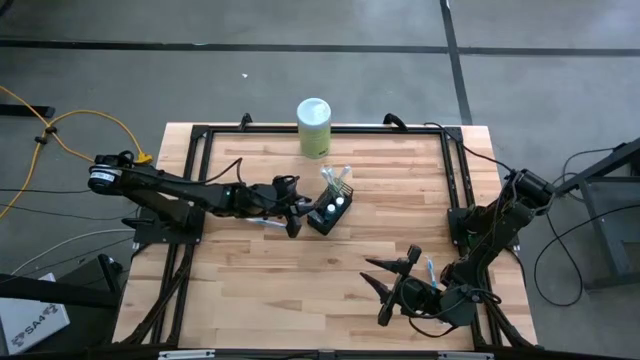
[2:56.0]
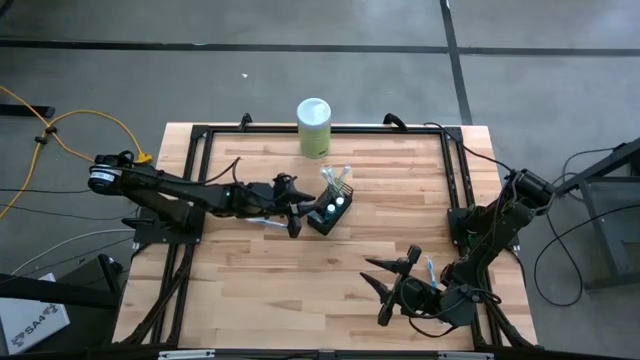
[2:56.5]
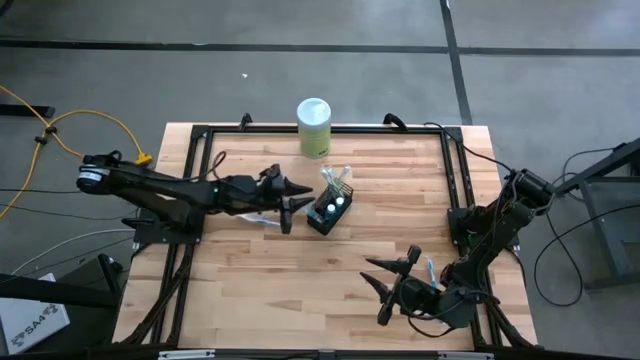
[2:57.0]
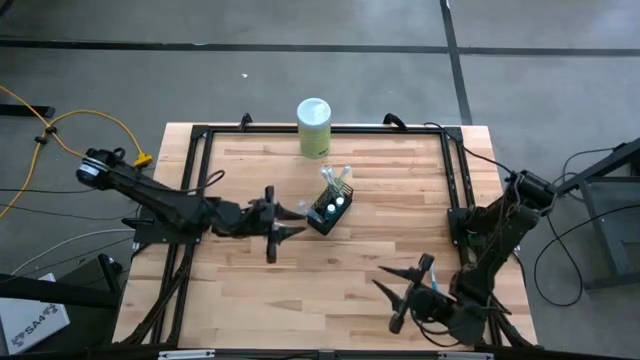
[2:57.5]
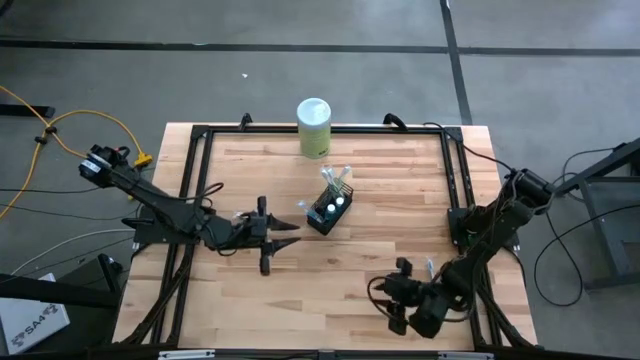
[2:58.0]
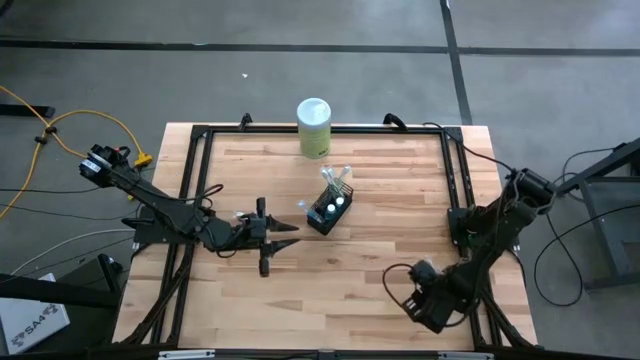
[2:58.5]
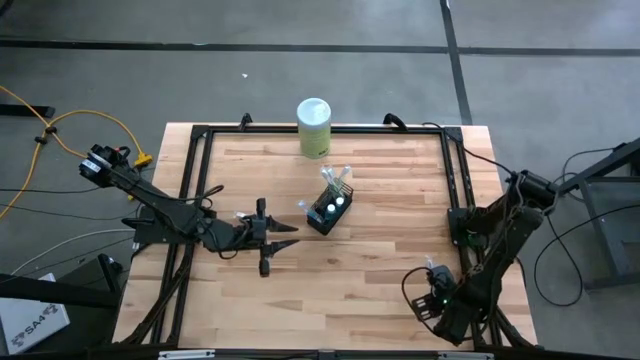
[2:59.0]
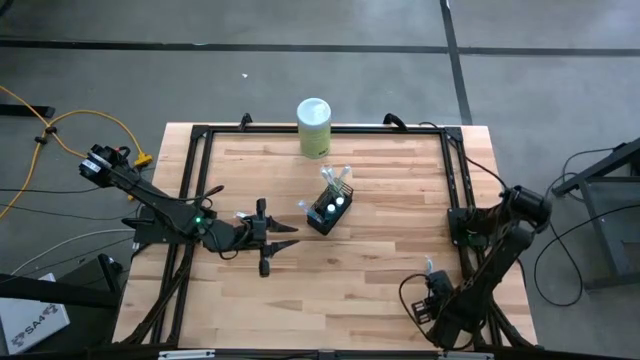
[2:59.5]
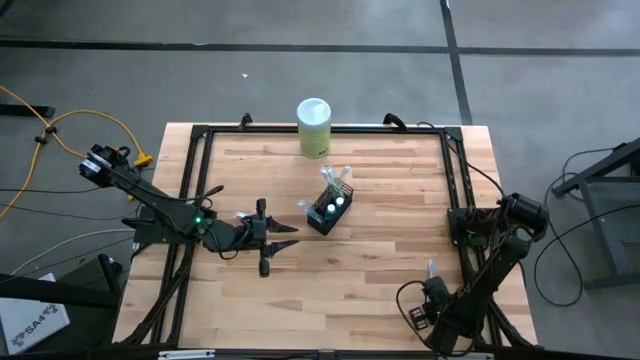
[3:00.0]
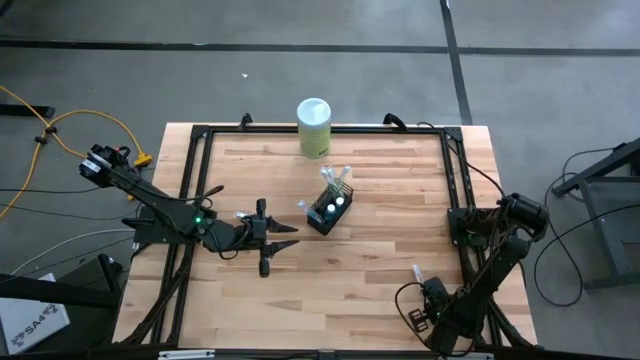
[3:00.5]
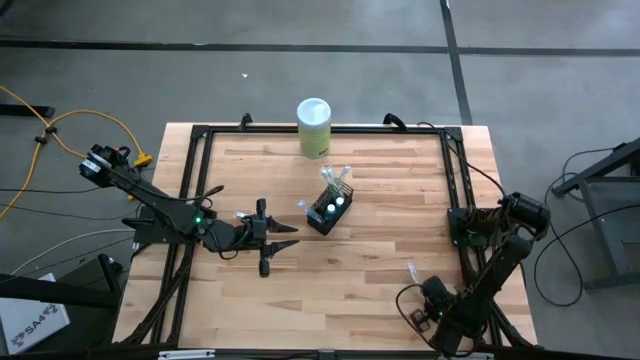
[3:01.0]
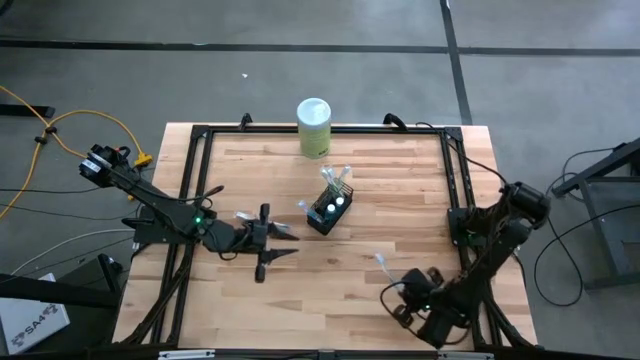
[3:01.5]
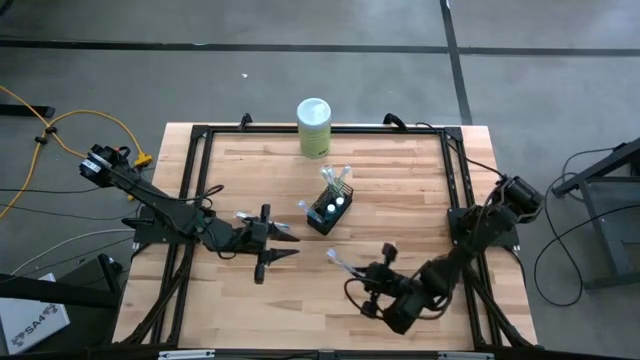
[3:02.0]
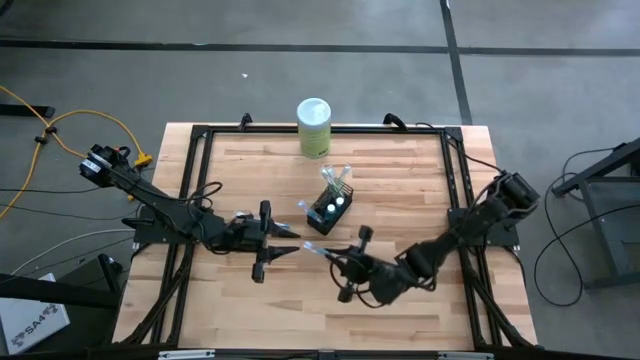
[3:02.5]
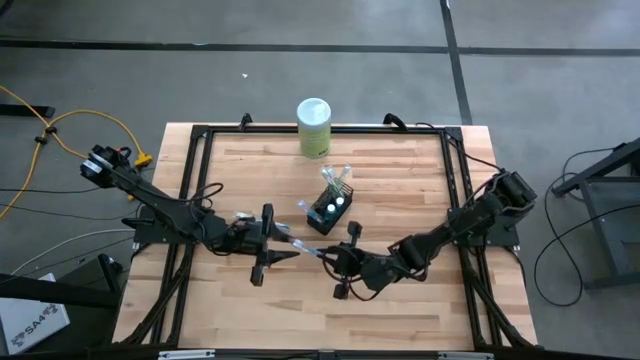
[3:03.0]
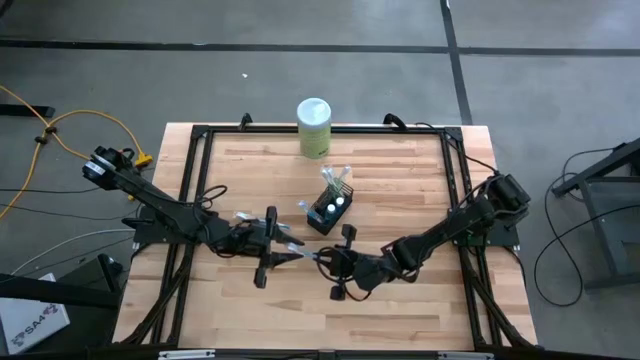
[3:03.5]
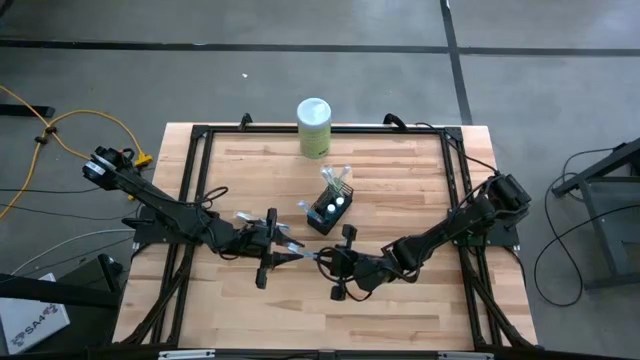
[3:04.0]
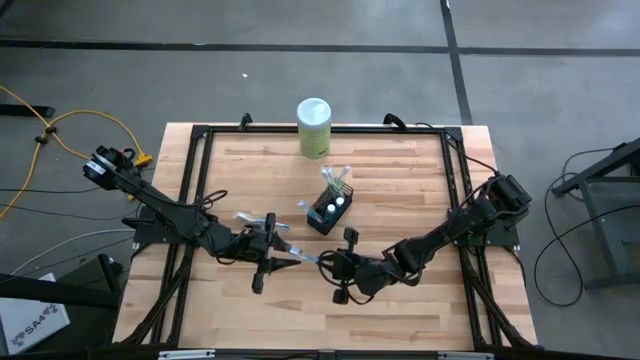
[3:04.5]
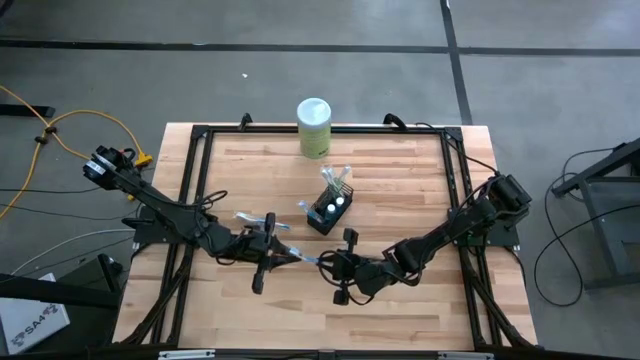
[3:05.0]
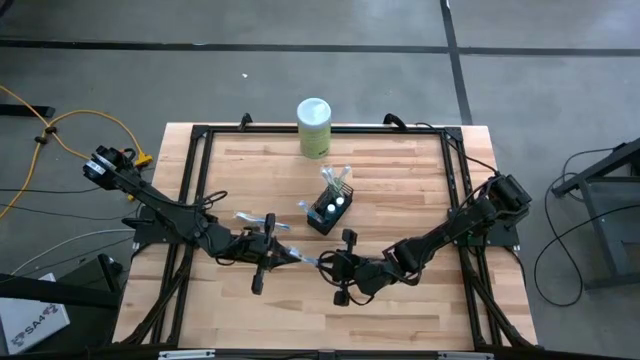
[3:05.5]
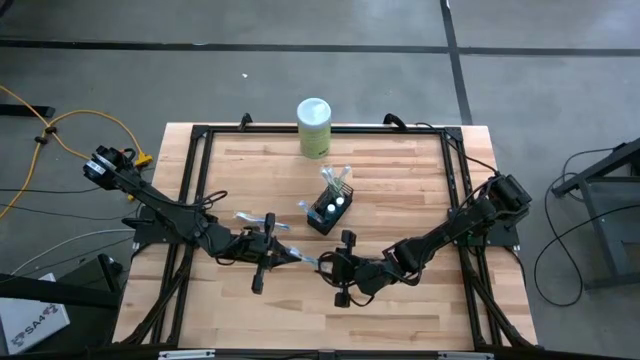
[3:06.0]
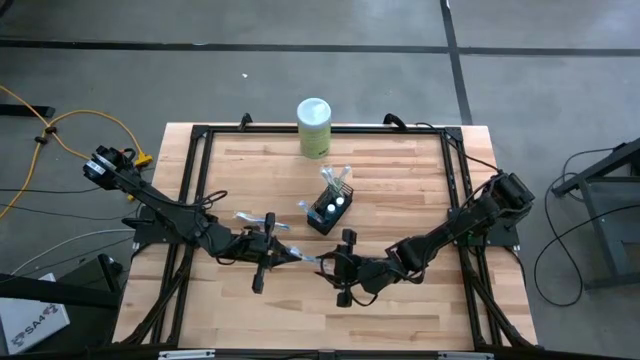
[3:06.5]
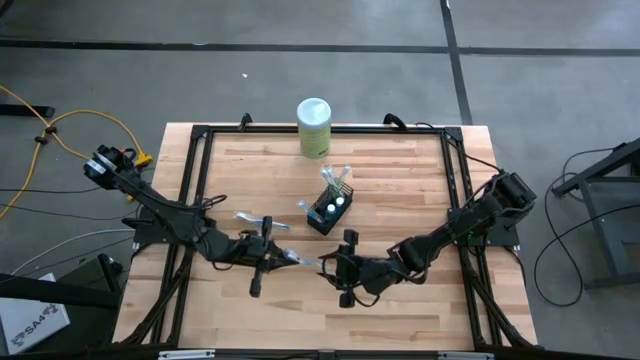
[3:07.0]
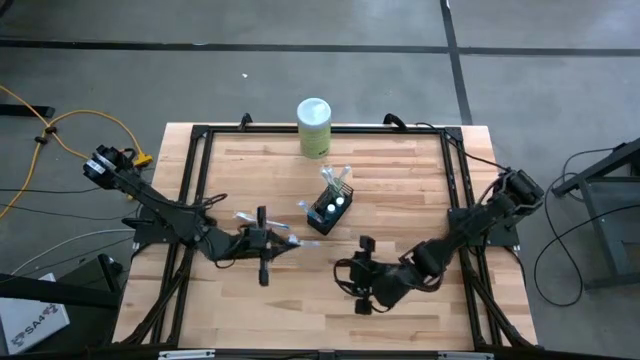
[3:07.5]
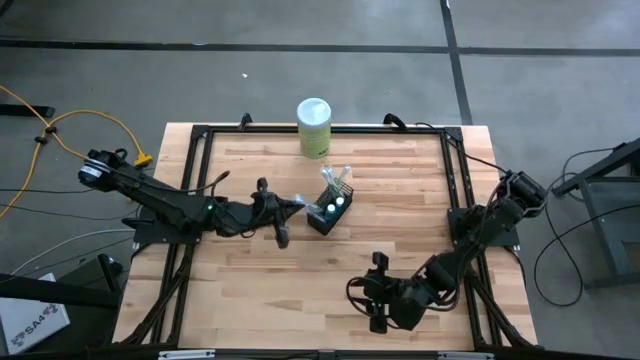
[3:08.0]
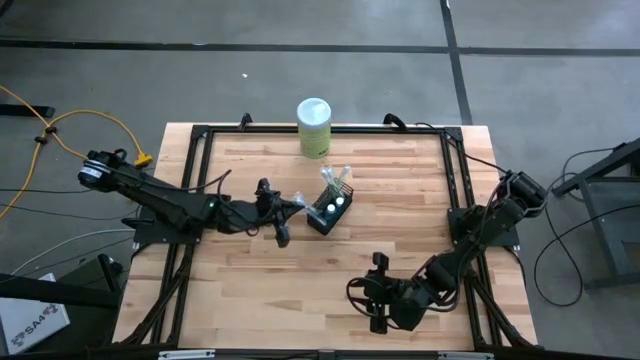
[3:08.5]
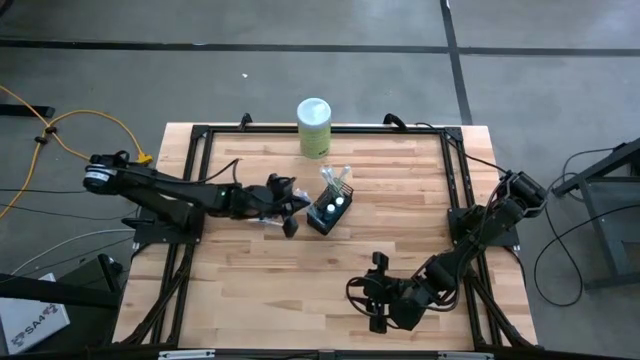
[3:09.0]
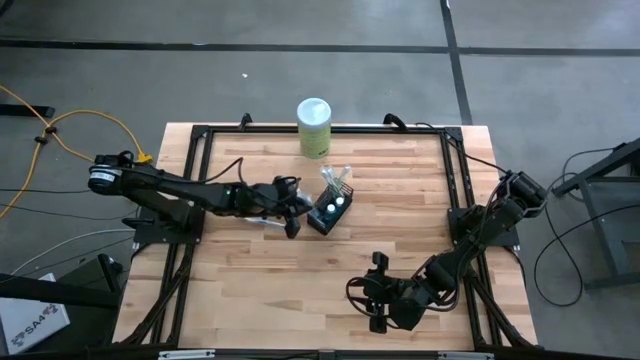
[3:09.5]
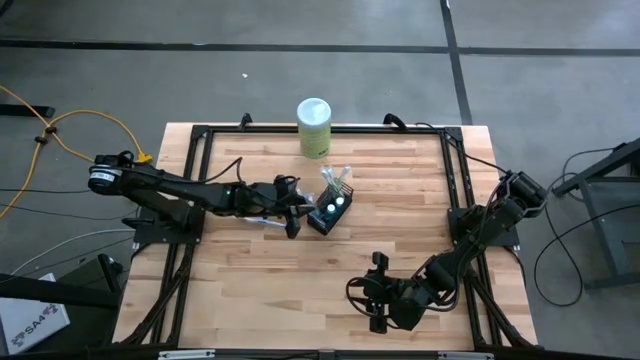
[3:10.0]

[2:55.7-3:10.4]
Task: Pick & Place toothbrushing station
Put the right blue toothbrush into the left section of the black wire organizer
